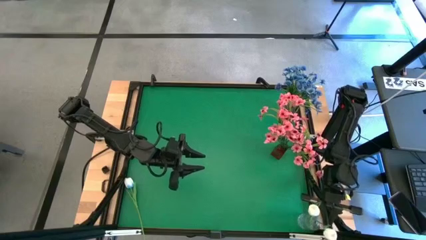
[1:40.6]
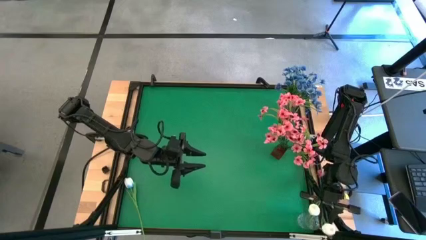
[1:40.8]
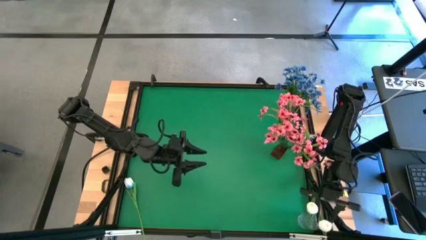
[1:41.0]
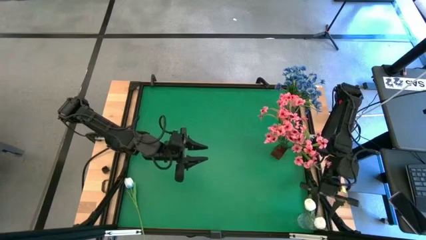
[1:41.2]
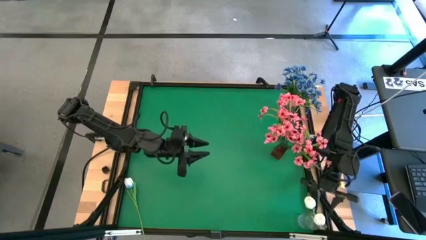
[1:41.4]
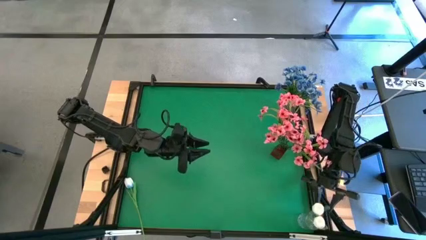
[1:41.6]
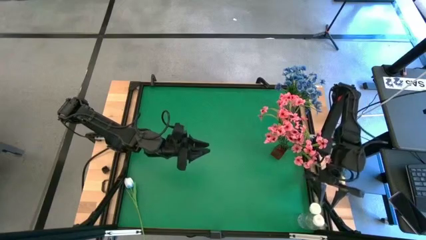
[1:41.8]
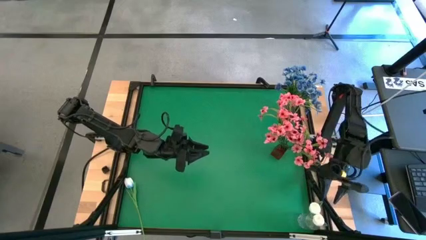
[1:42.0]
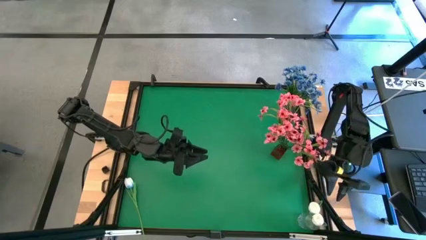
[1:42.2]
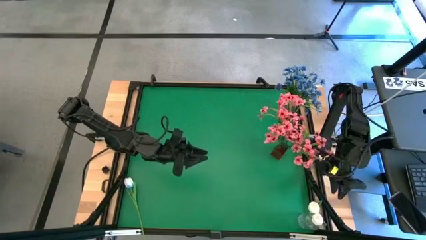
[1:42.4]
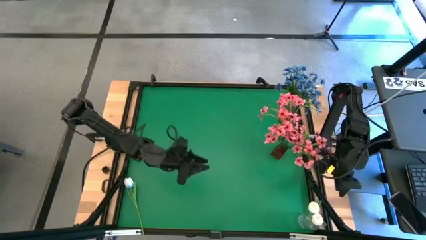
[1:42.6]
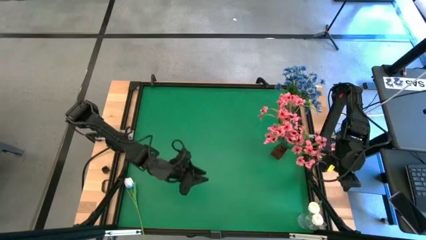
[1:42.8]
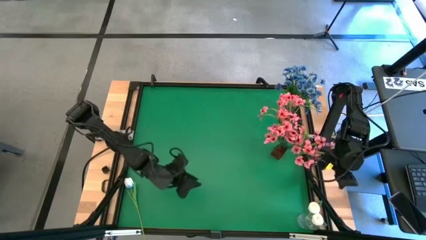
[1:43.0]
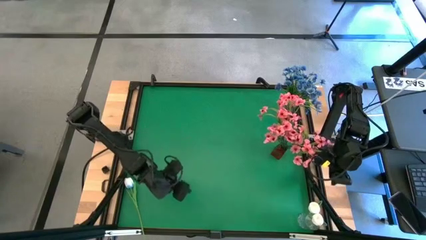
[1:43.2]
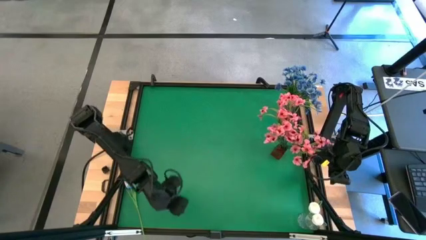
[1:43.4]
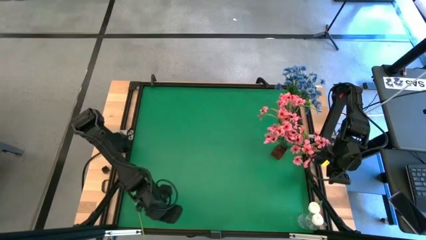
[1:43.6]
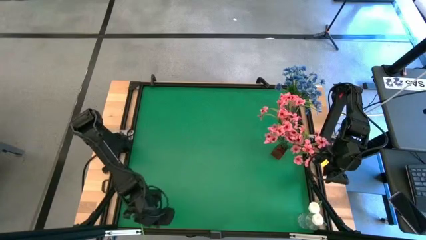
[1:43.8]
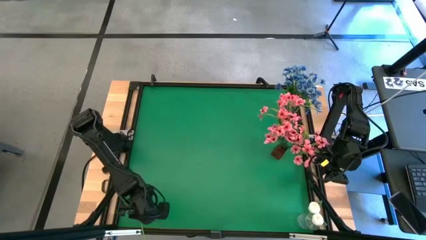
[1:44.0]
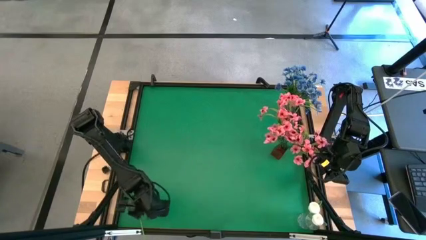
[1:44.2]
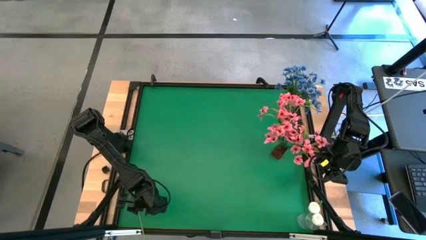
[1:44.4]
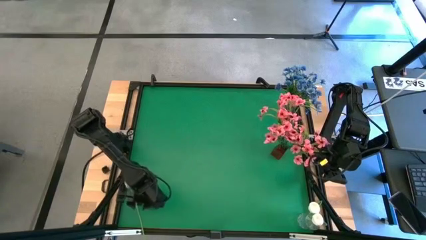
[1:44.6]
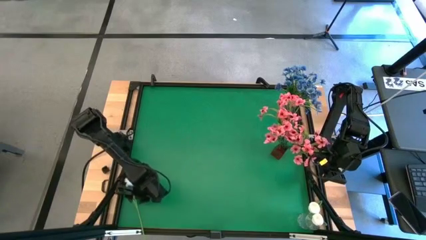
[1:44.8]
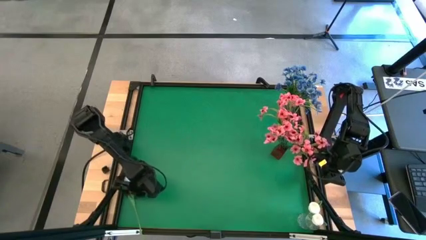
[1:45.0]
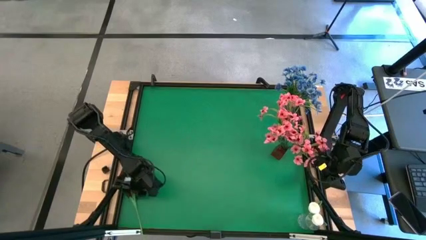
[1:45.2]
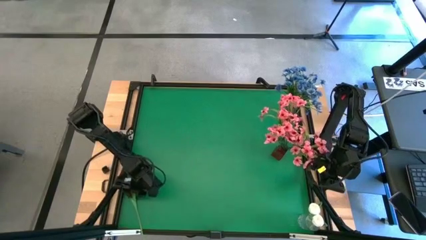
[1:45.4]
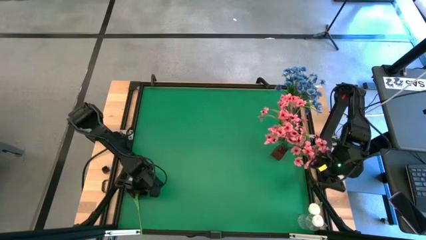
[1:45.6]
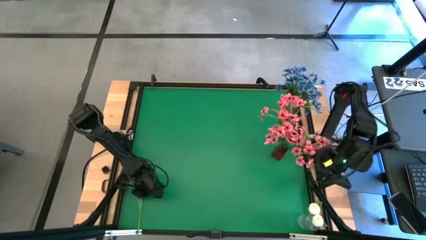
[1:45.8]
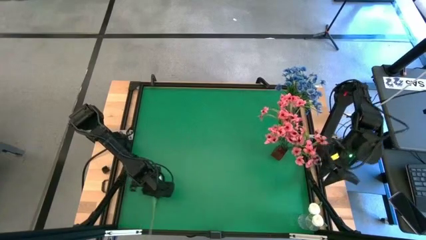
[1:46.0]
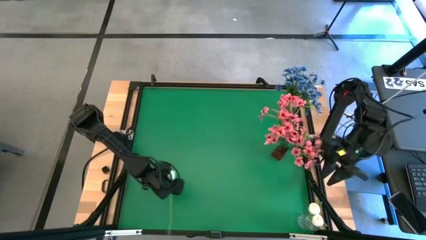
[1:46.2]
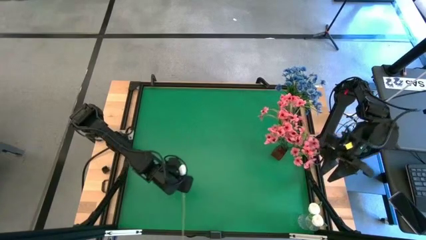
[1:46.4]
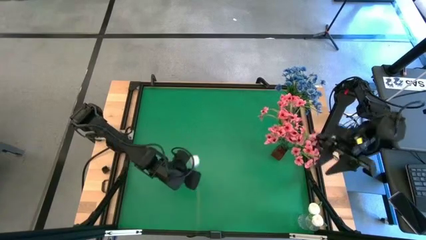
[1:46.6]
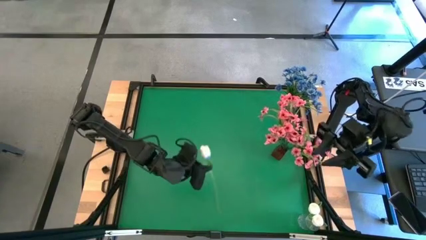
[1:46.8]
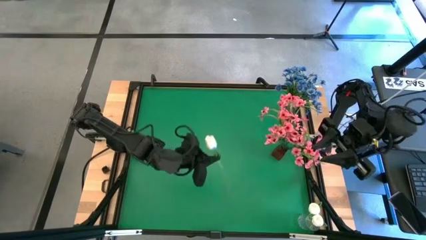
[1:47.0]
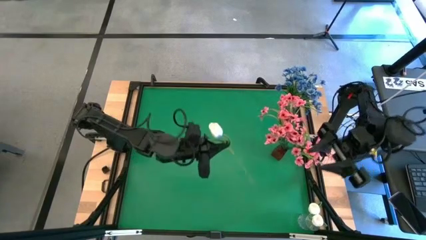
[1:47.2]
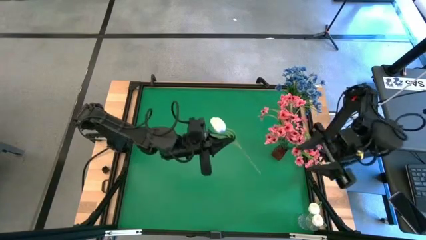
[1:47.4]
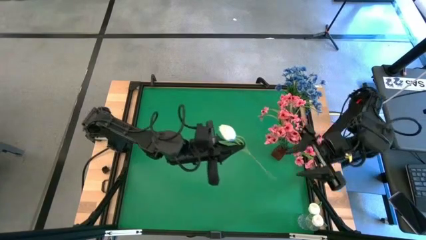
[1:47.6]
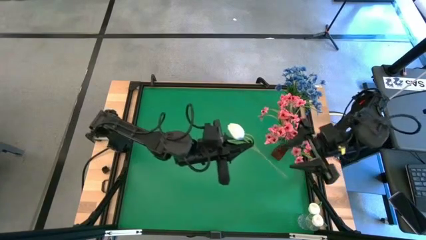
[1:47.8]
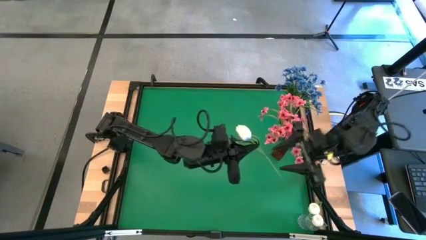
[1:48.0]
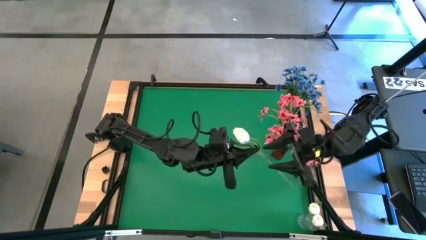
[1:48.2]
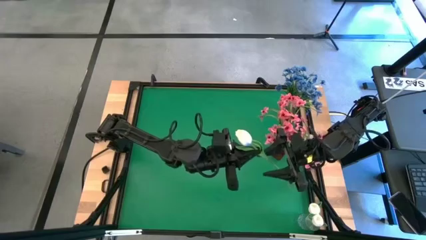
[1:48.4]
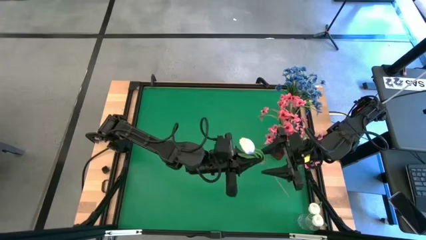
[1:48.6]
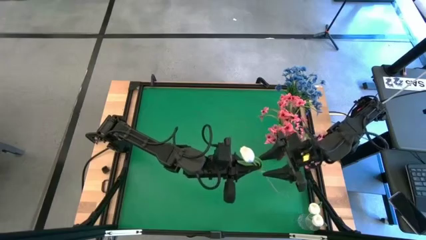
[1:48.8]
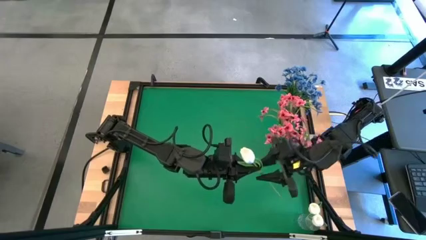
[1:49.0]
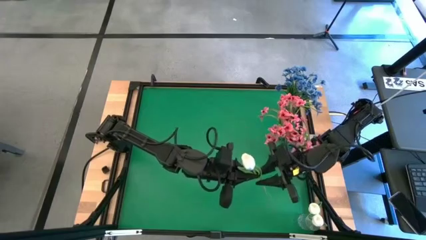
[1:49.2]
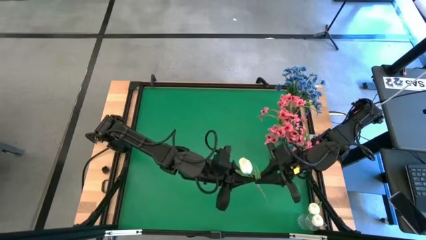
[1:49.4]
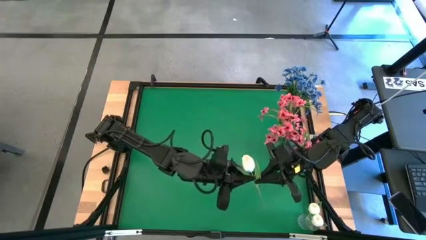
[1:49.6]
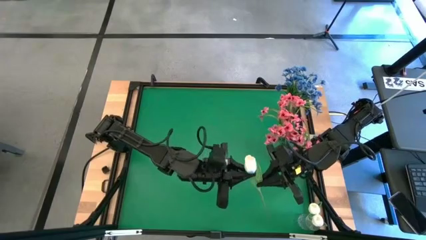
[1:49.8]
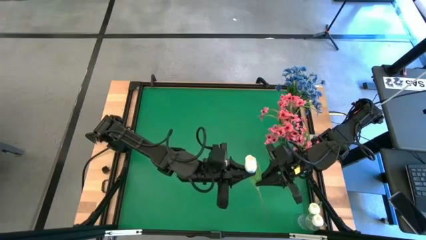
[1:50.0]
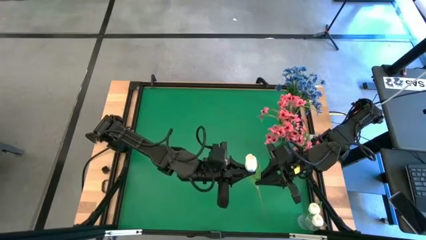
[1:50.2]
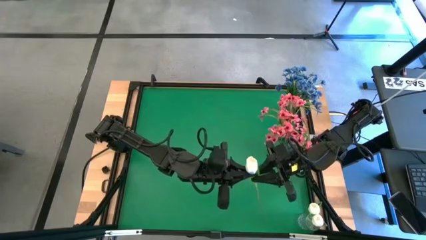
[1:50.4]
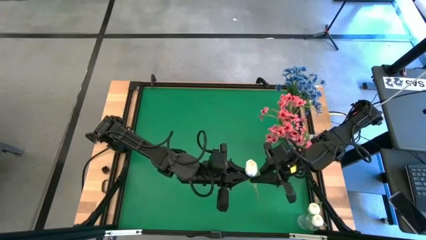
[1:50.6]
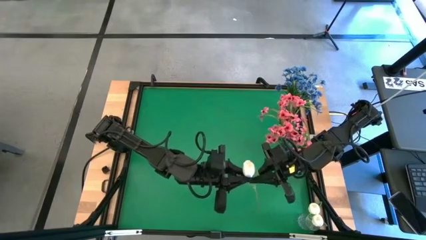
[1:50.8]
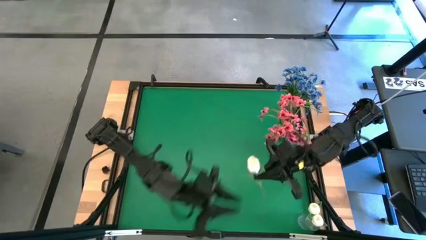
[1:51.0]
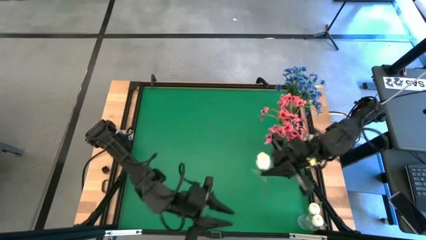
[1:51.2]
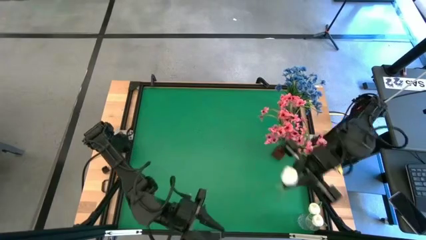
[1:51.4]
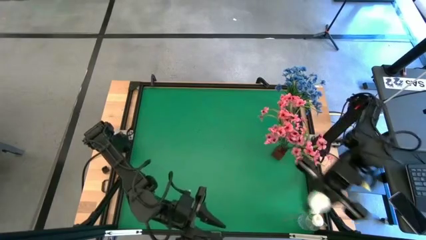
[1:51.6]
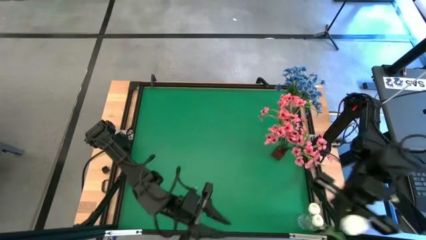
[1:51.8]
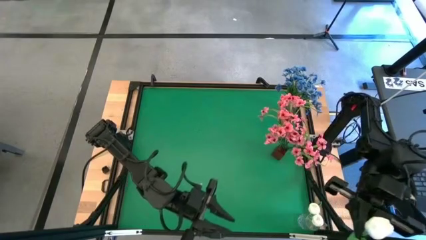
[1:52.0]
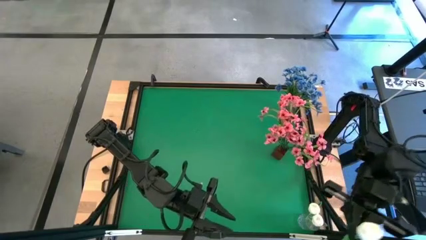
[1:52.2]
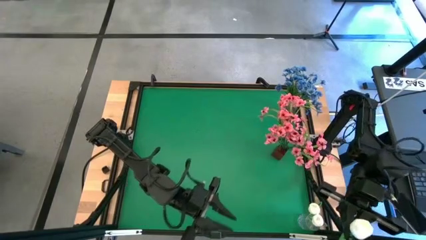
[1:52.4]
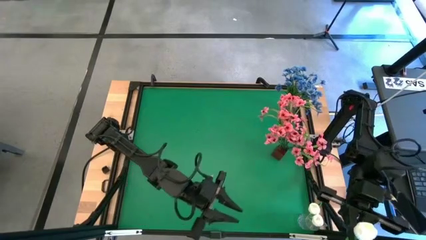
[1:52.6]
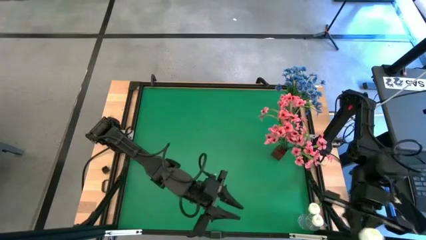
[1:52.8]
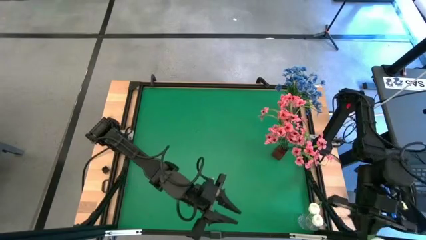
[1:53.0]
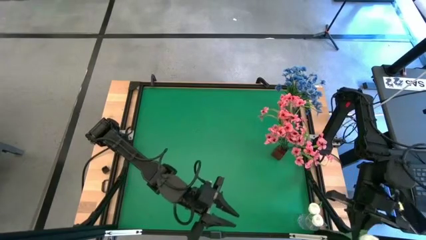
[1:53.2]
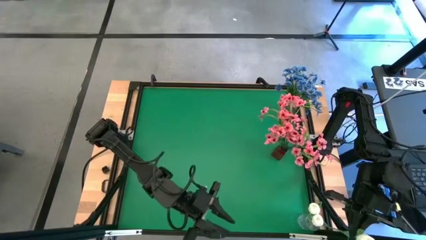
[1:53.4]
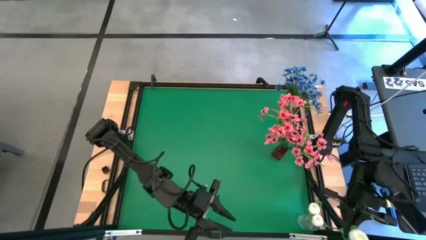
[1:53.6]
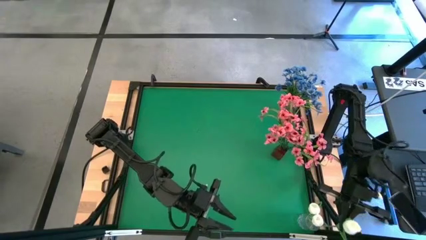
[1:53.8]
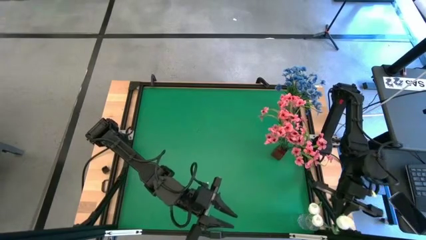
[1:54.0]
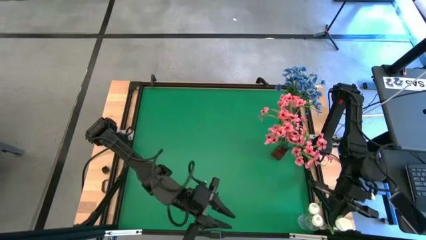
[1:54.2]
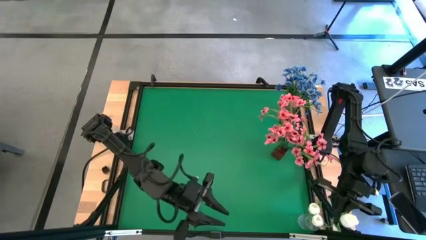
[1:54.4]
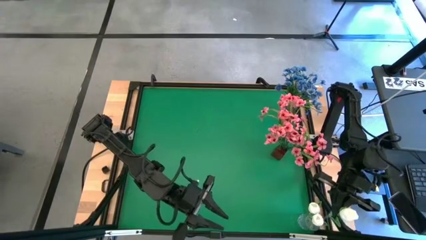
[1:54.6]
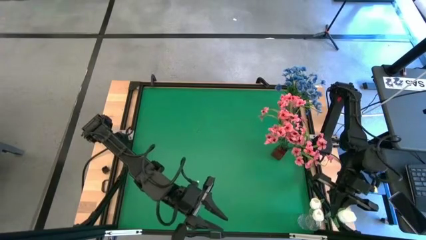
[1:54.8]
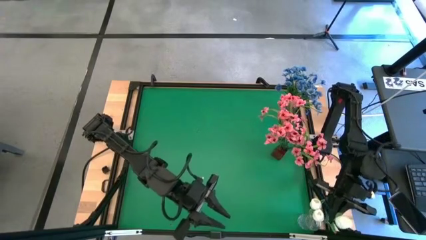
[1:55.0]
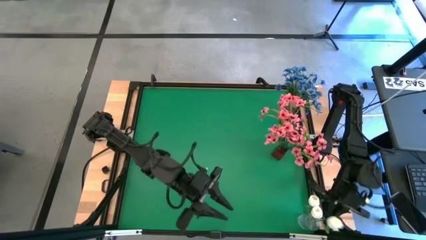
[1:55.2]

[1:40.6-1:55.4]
Task: Sort flowers into vase by color
Put the white flower into the transparent vase
